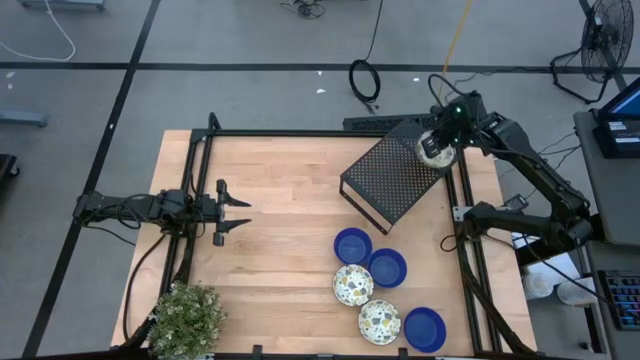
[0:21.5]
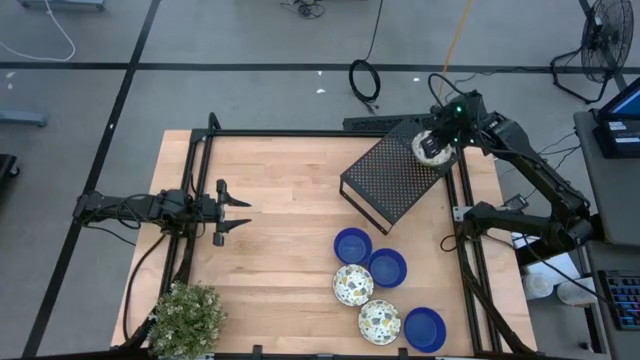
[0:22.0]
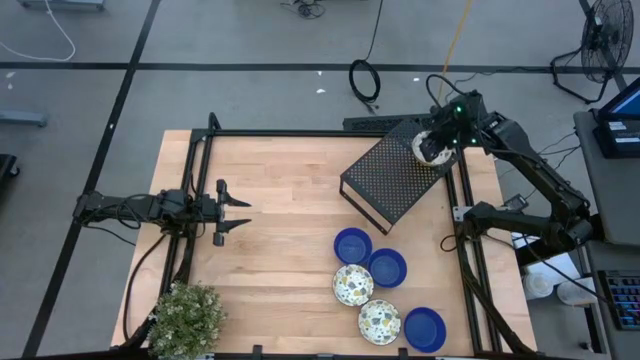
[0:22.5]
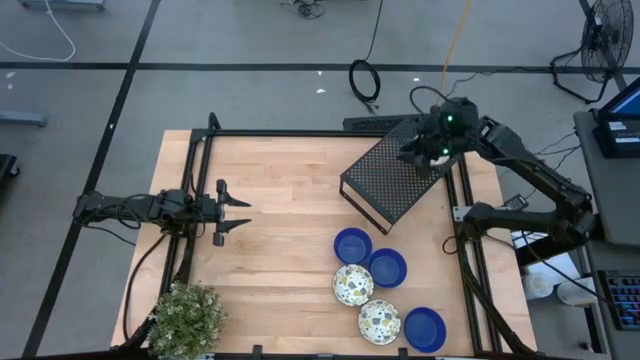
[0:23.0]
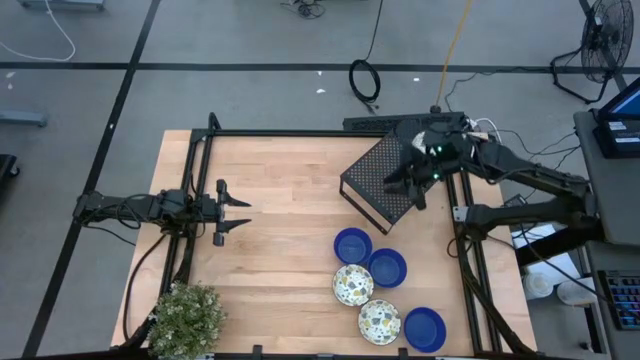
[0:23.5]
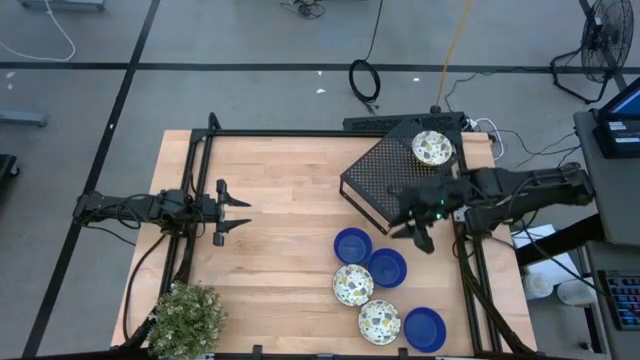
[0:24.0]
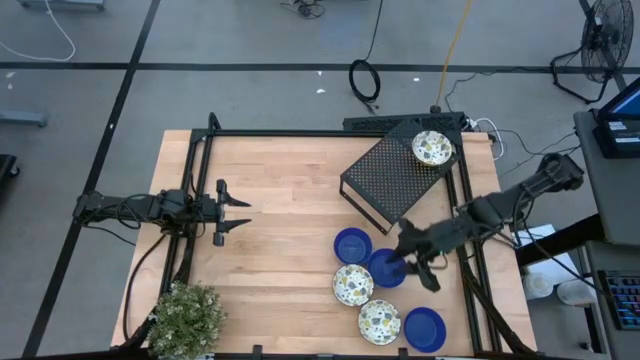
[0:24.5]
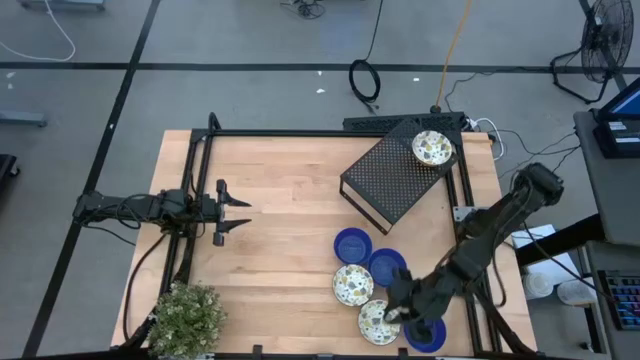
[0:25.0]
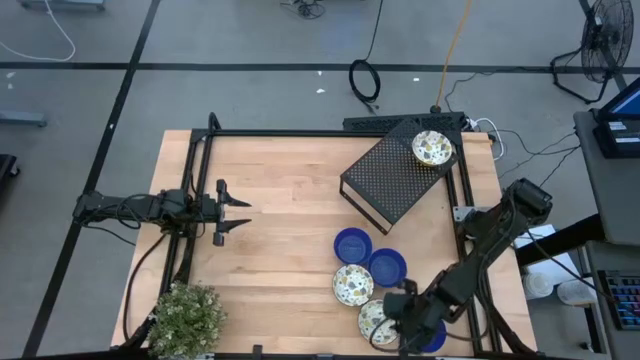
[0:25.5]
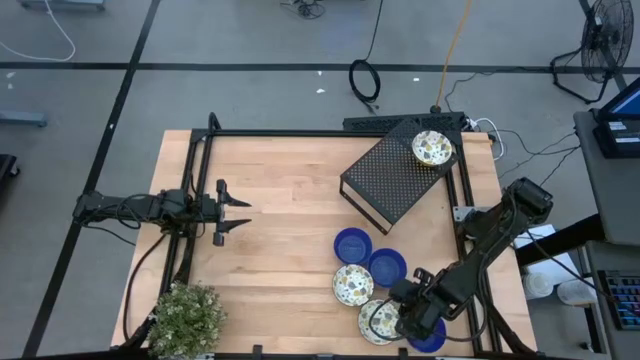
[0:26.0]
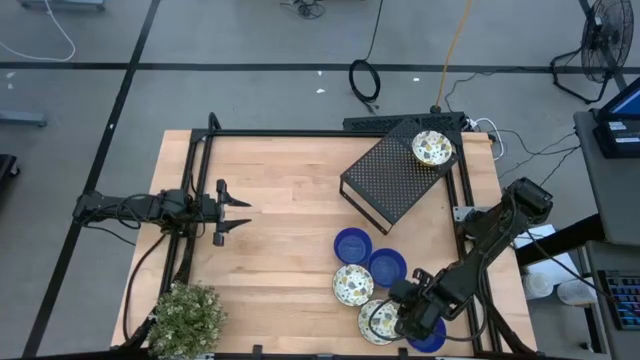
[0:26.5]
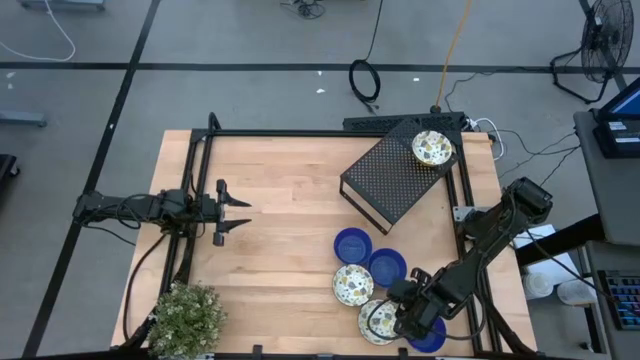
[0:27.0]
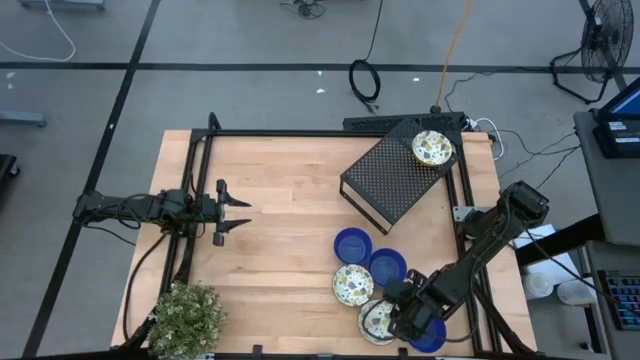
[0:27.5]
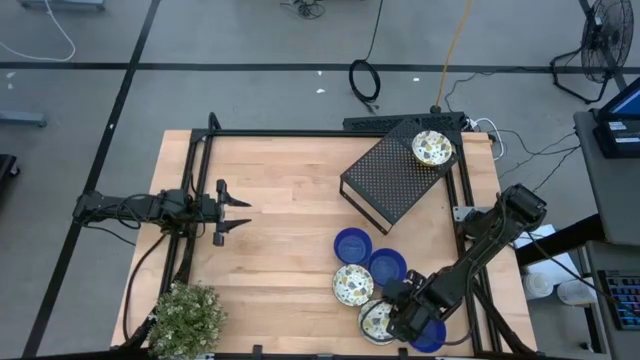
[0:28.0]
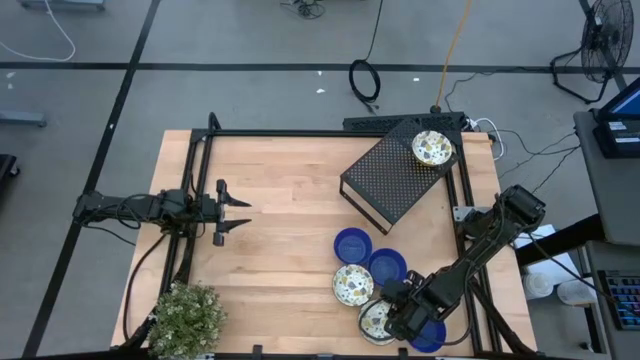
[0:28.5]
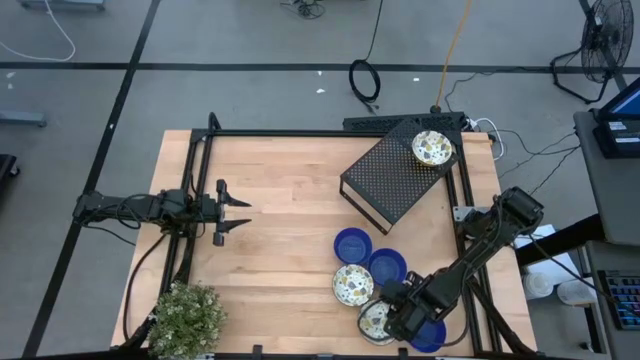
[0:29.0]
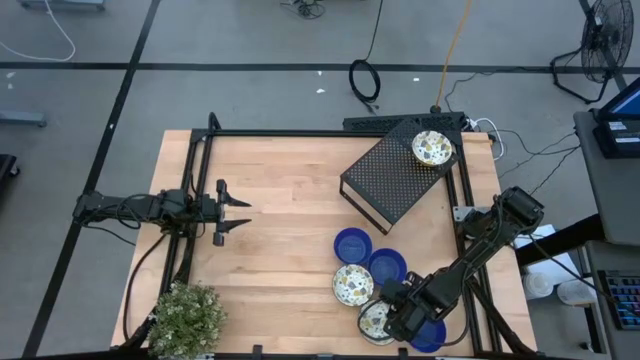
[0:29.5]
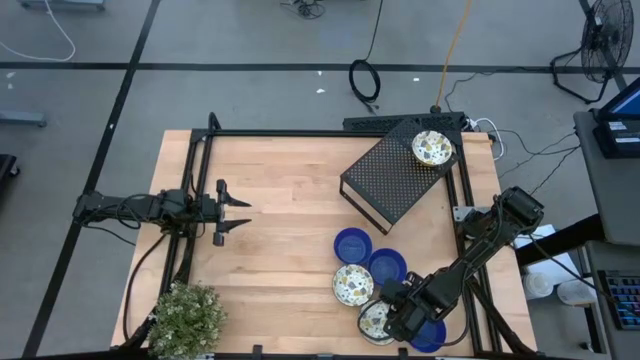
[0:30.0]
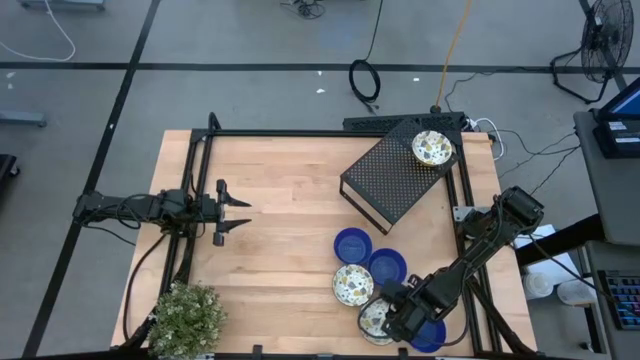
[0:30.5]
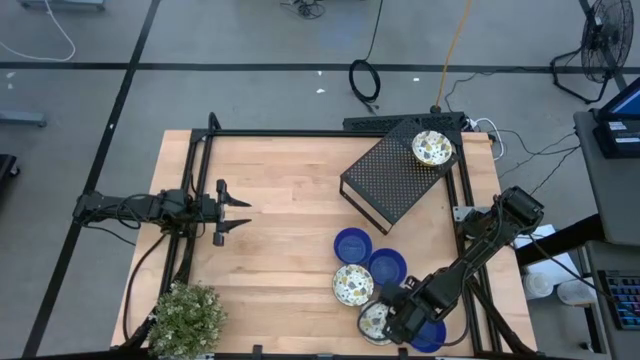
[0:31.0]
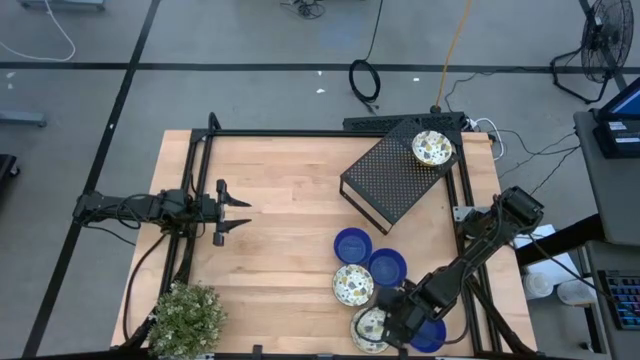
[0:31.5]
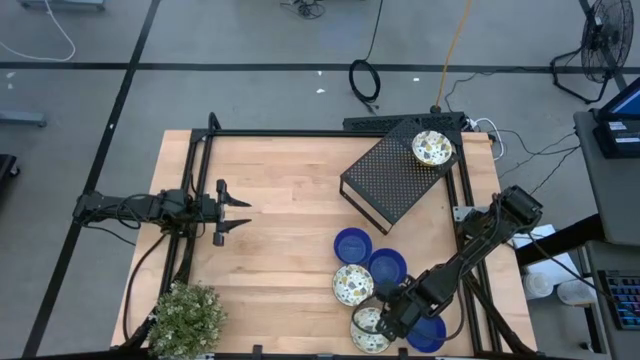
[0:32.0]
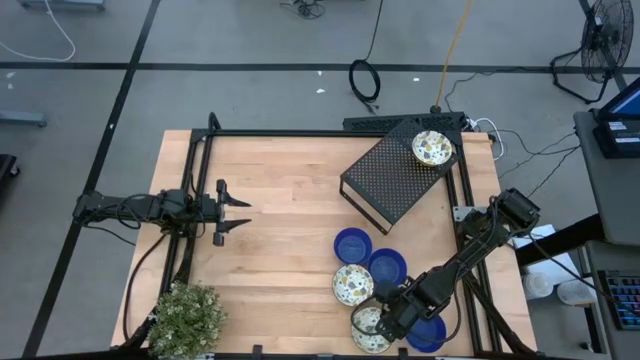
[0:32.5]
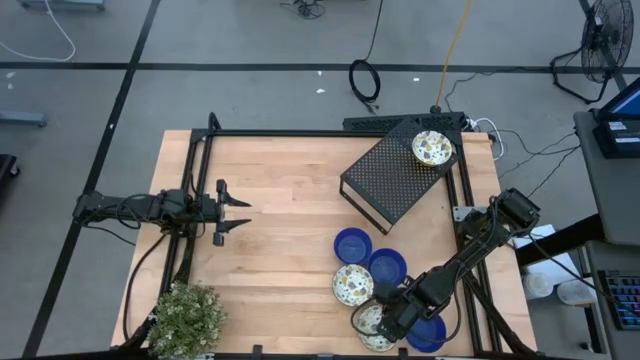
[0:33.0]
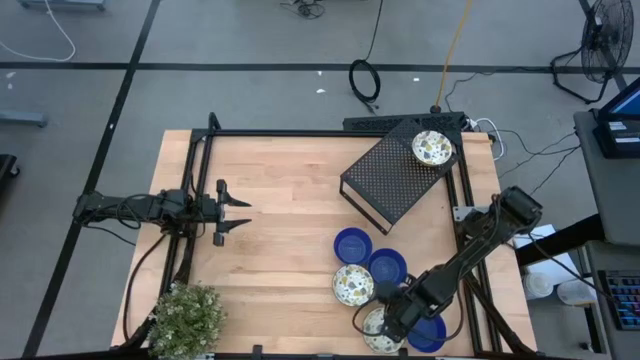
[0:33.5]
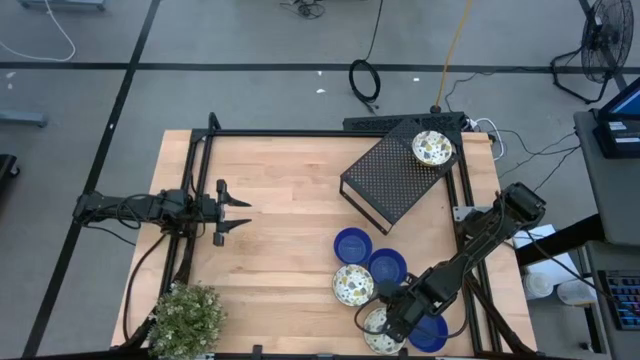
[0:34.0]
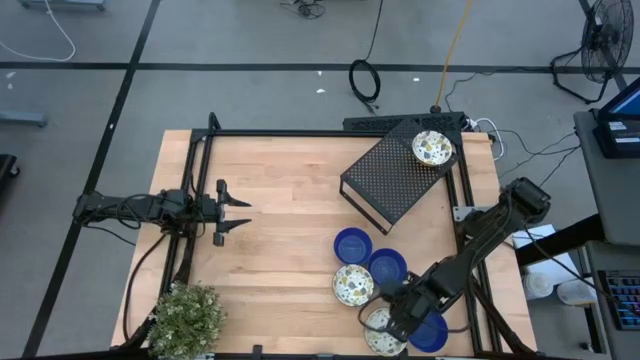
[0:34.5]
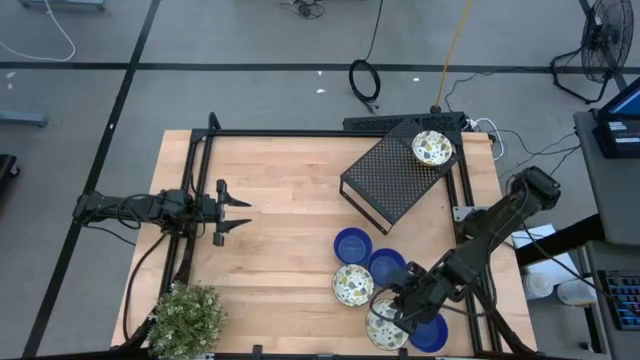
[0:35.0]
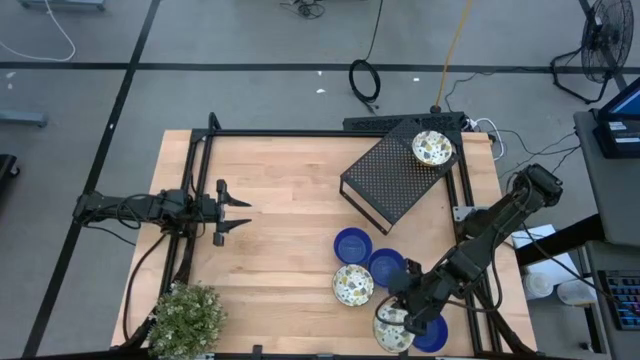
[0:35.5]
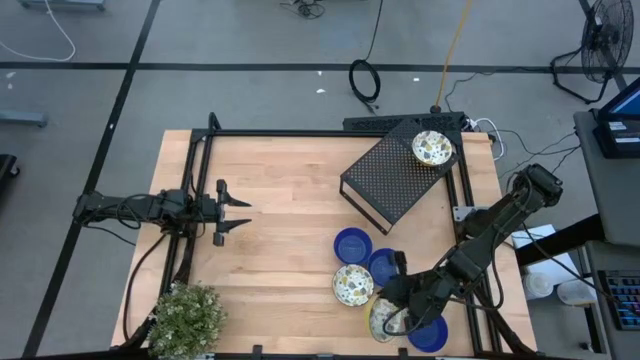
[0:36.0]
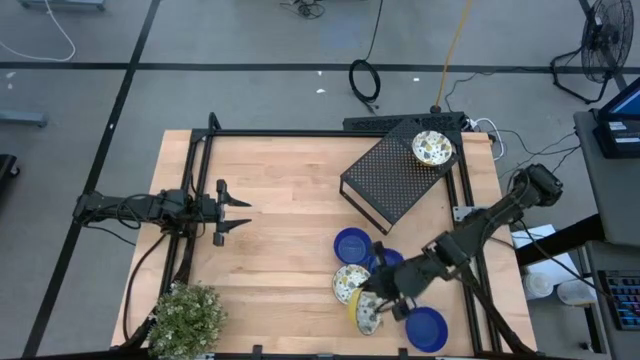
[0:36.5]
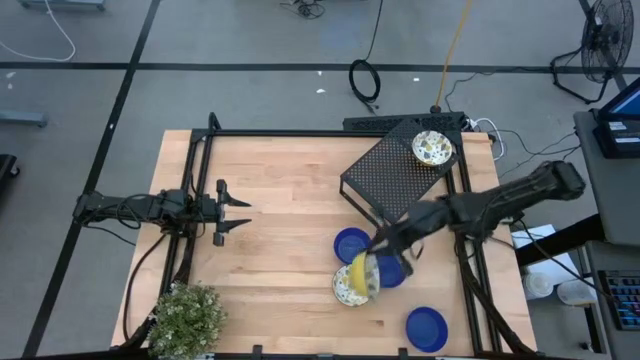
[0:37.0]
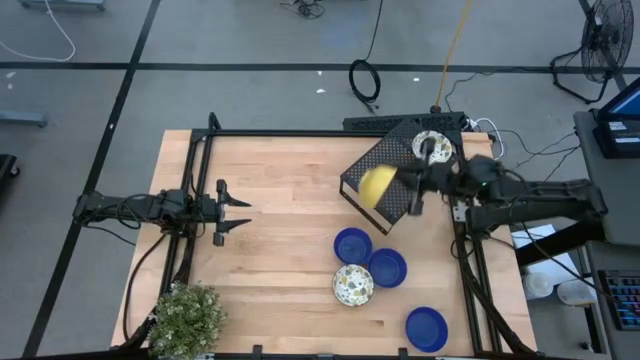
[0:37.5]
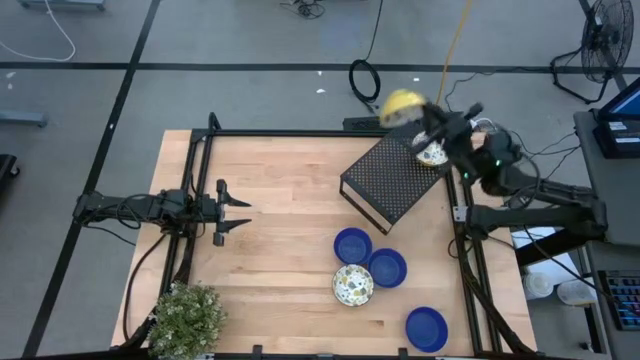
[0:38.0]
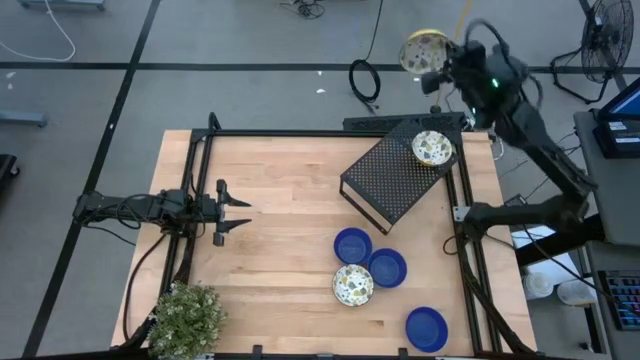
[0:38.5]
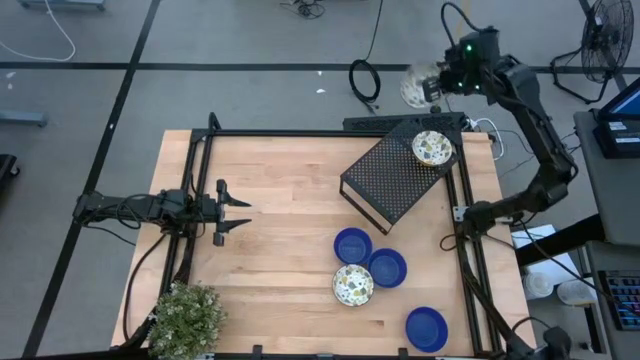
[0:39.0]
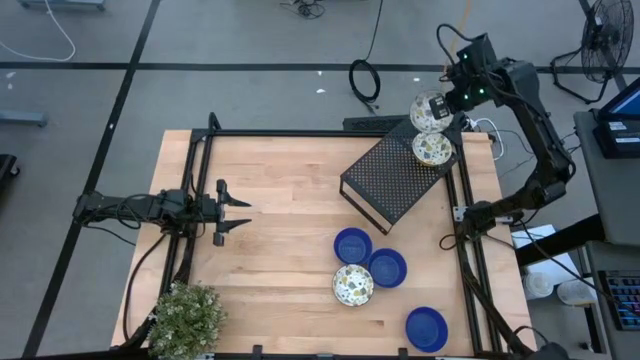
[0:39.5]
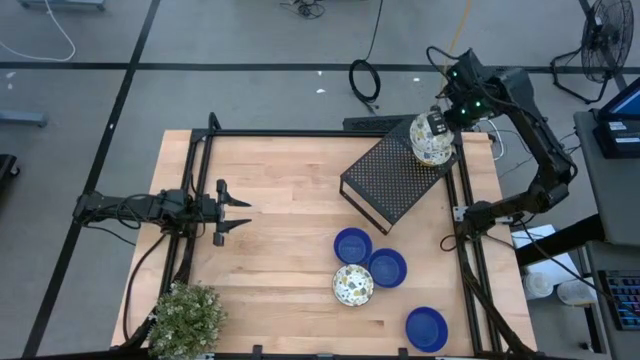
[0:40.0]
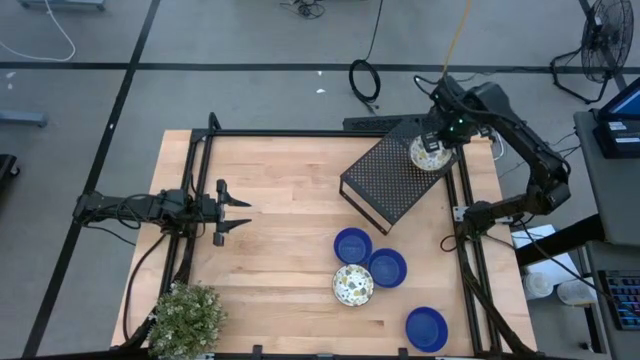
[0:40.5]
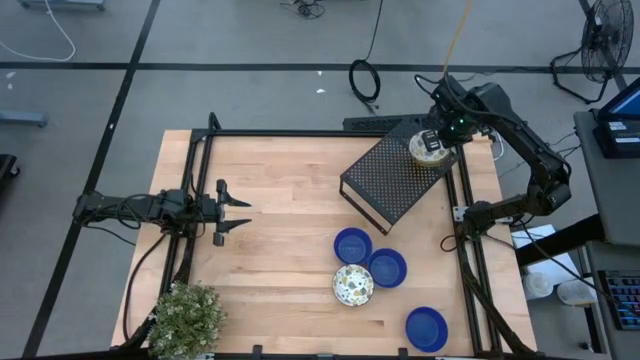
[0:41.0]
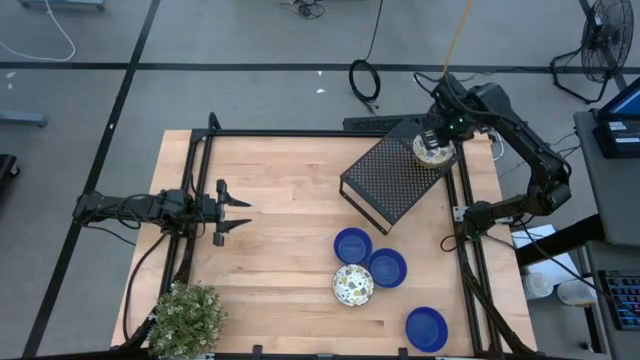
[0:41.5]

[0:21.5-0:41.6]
Task: Pick & Place Mini bowls
Stack the bottom patterned yellow bowl on the patterned yellow bowl on the shelf
